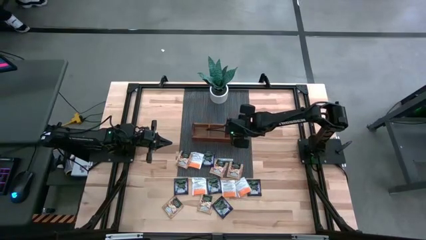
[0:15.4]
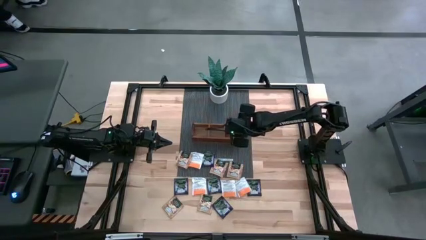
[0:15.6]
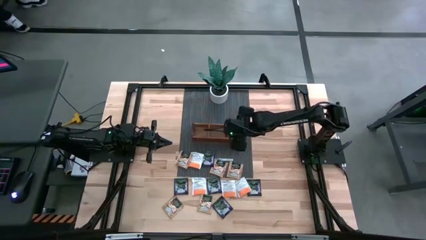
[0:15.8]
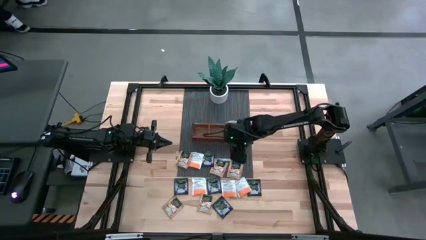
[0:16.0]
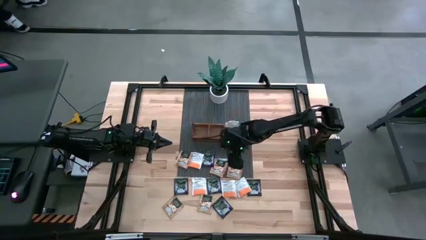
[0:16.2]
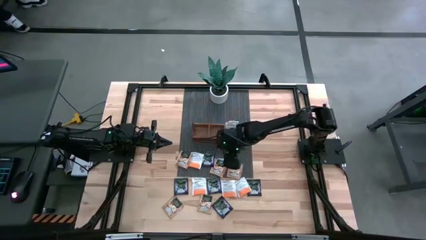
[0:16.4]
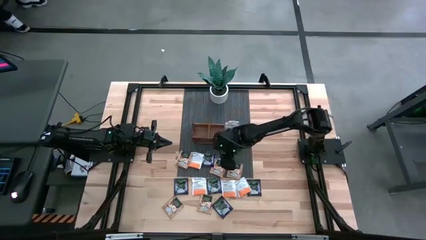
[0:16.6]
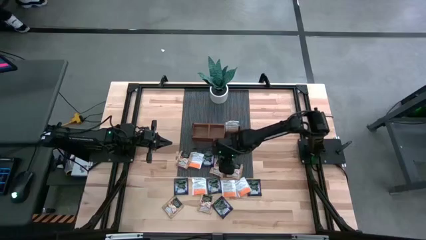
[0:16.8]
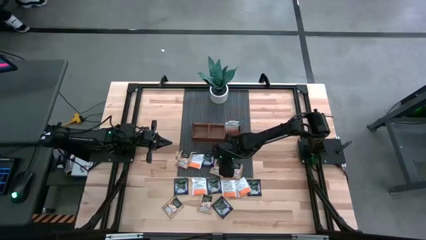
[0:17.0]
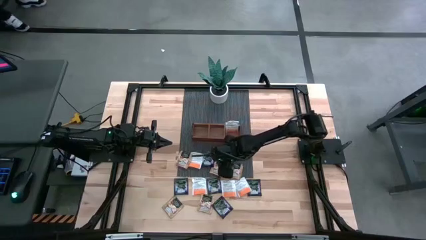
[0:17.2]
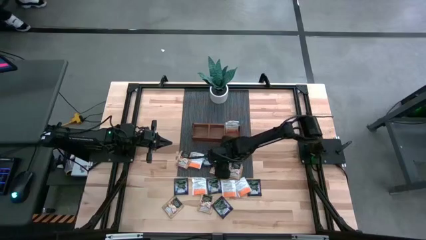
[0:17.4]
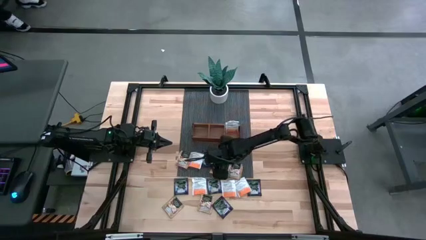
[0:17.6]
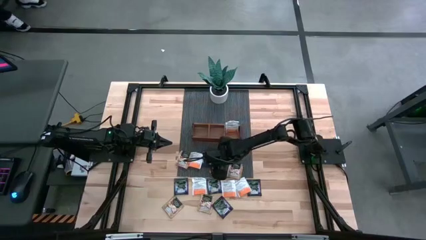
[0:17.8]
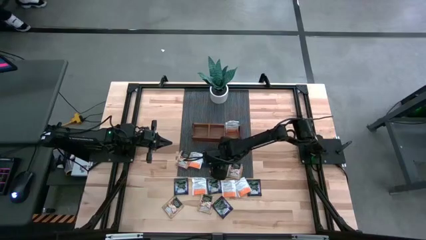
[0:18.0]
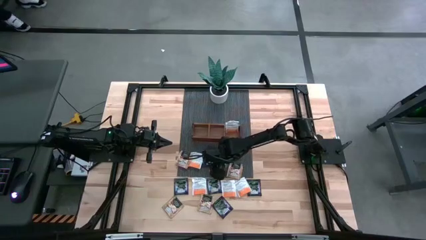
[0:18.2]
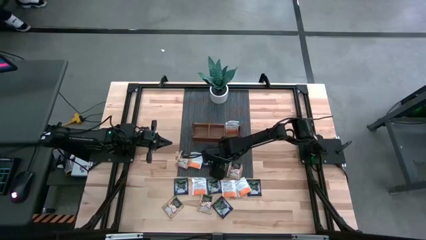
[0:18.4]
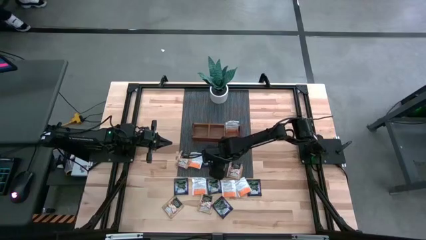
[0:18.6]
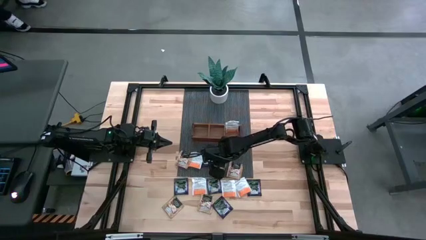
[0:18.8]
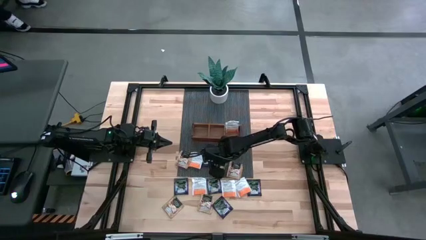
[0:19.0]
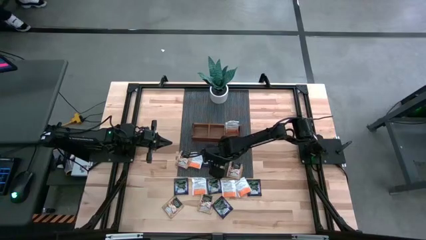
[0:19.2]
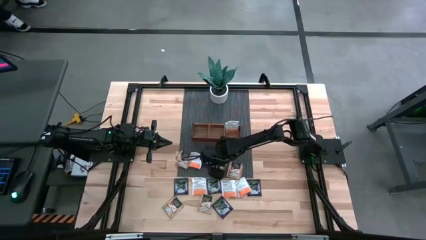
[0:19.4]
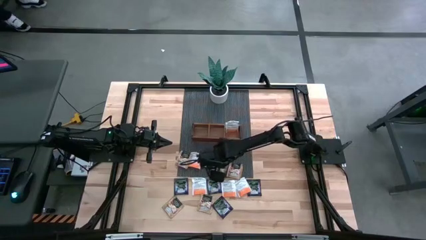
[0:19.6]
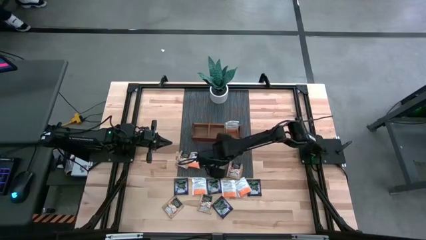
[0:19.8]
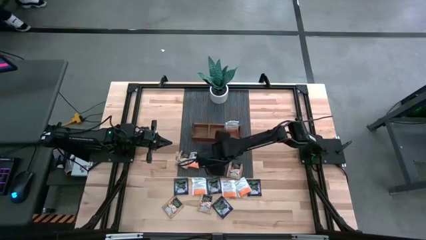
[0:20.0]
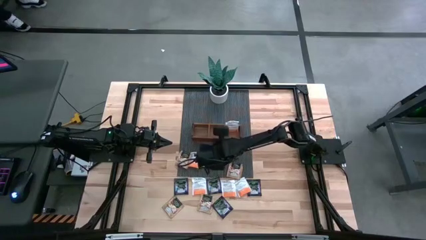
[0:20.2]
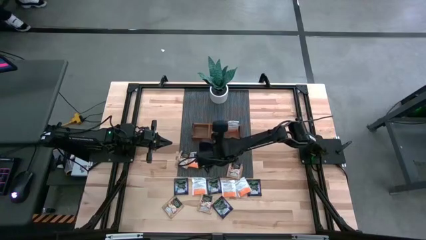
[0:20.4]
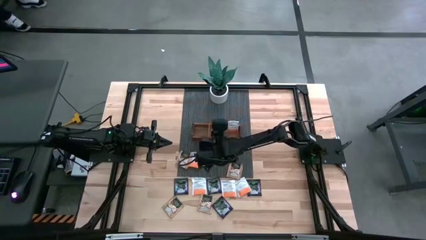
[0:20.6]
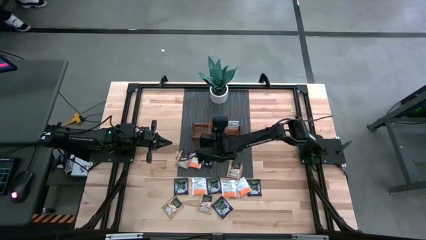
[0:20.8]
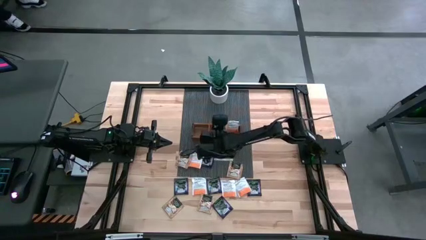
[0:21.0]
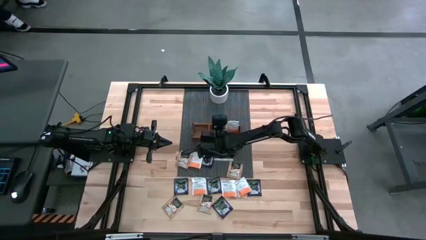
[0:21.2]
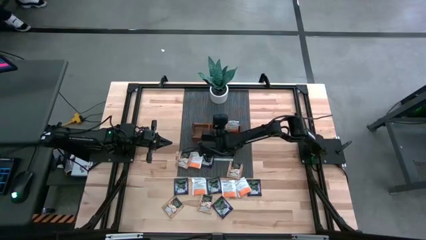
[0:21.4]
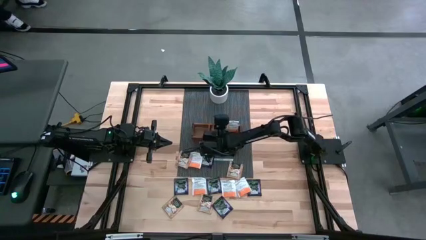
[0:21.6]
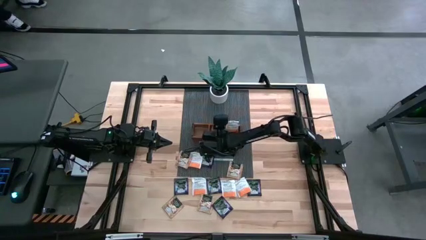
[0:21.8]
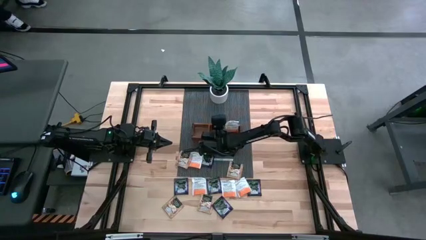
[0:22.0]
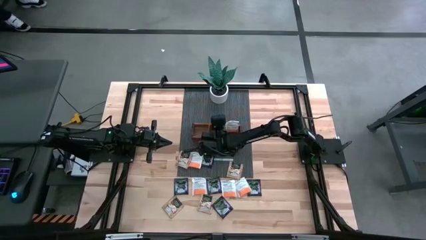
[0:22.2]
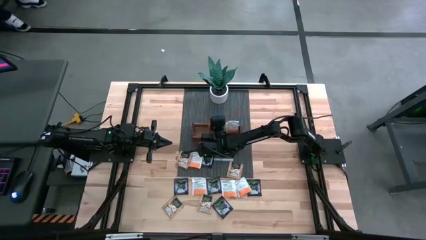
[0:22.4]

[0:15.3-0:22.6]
Task: Pick & Place Tea
Put the brown tea bag into the middle section of the wooden organizer

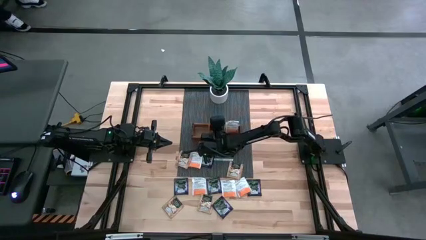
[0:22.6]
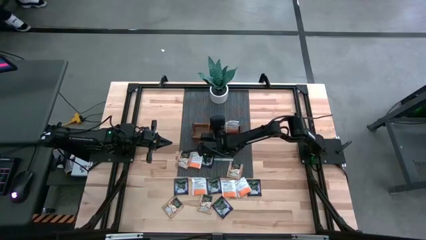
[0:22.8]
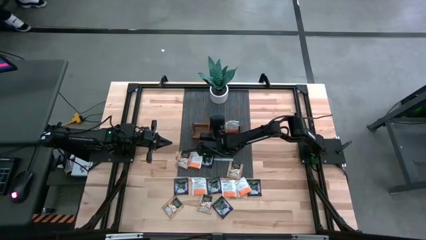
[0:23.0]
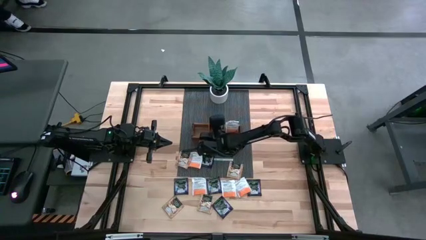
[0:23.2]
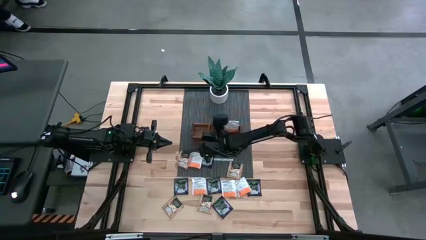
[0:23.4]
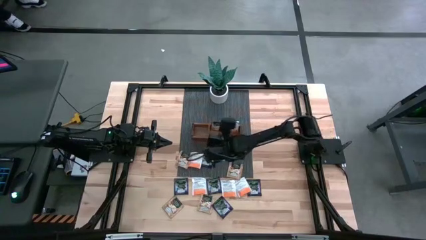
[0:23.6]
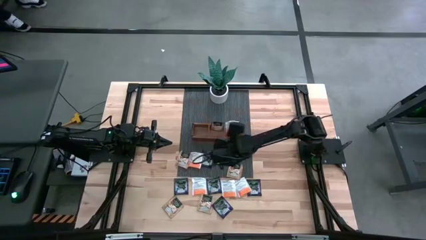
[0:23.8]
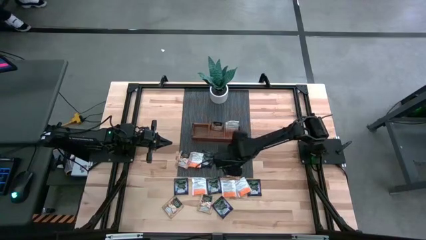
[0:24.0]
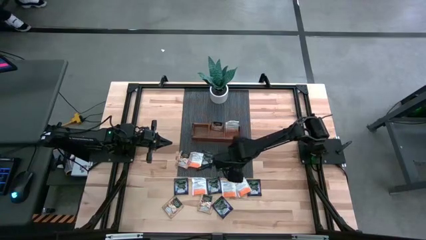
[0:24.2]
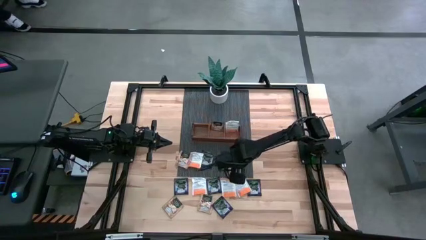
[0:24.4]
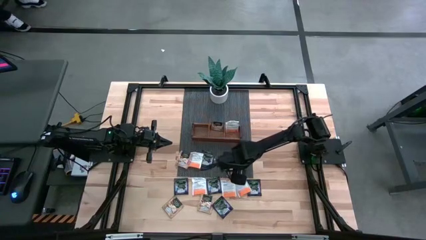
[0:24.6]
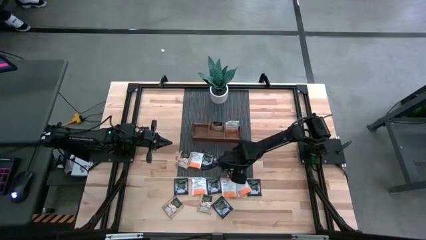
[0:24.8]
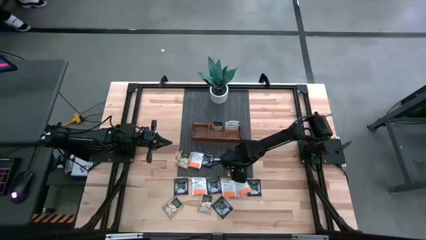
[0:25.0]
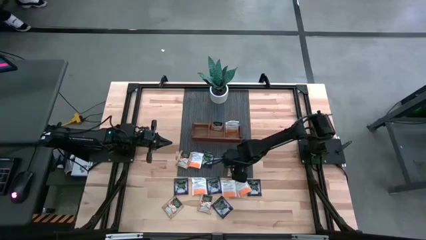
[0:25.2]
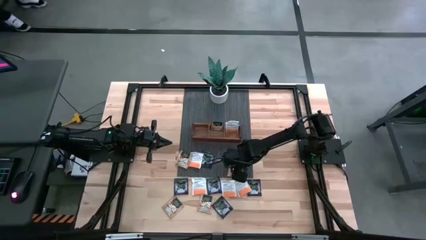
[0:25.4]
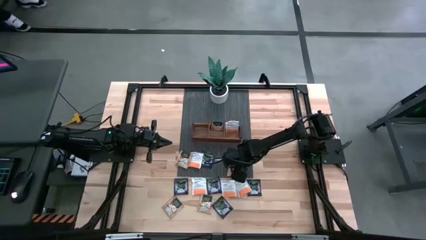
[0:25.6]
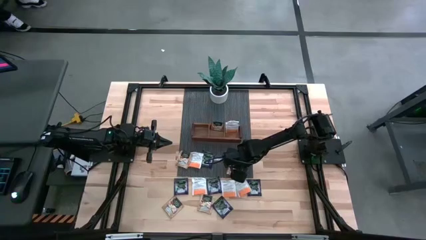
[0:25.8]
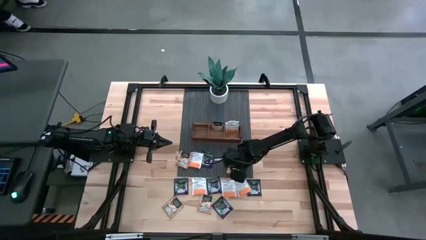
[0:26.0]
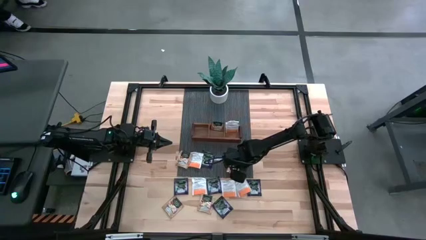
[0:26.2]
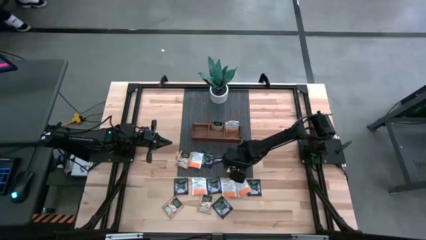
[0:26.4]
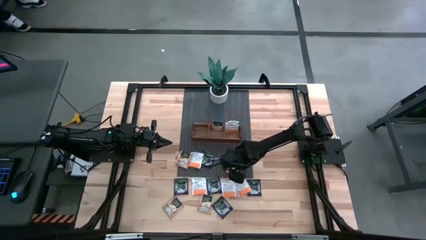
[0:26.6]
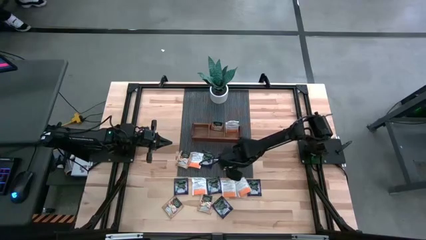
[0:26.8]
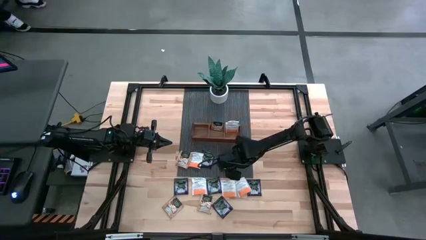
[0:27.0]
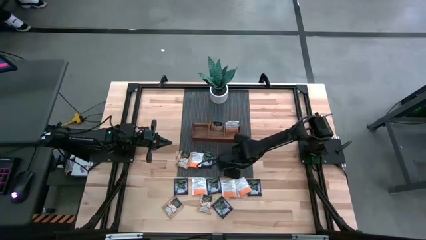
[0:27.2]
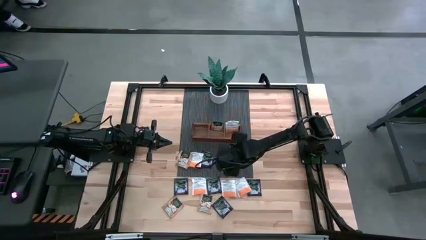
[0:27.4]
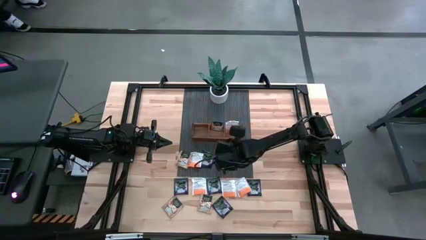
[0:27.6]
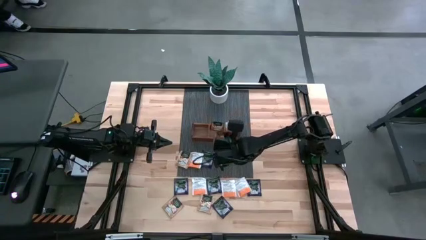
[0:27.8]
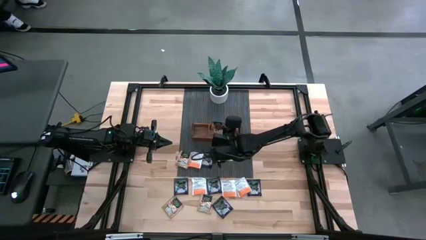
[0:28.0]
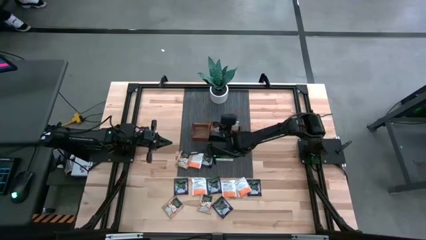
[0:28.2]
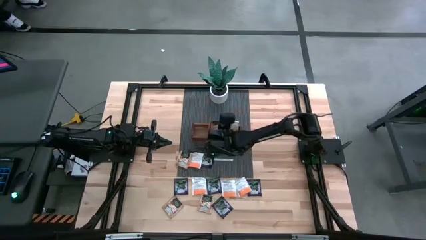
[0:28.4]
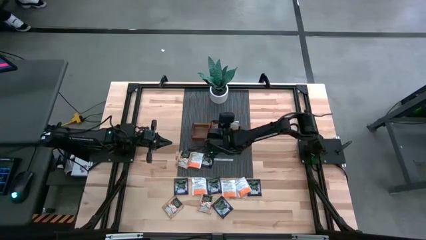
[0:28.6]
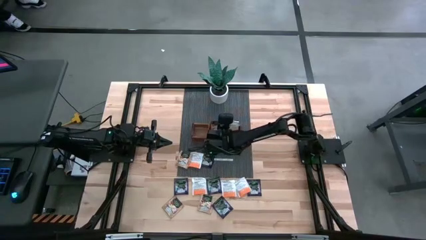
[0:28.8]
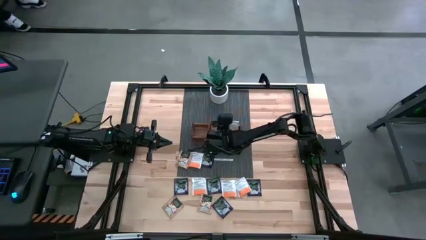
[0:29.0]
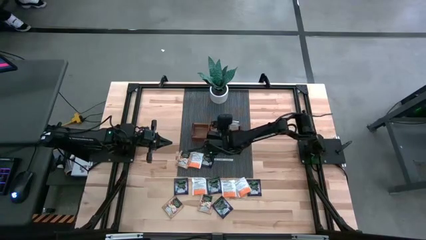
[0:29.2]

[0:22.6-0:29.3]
Put the brown tea bag into the middle section of the wooden organizer
